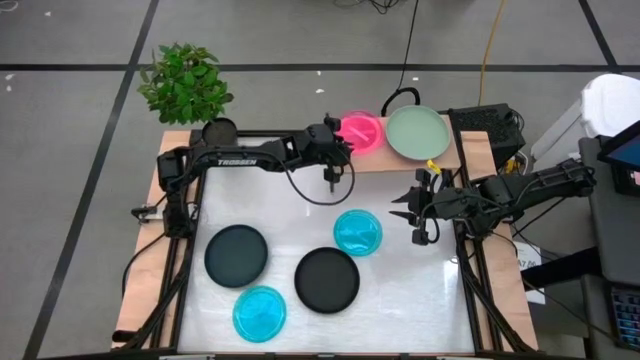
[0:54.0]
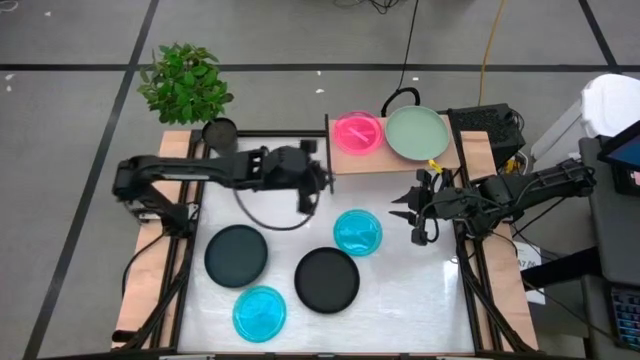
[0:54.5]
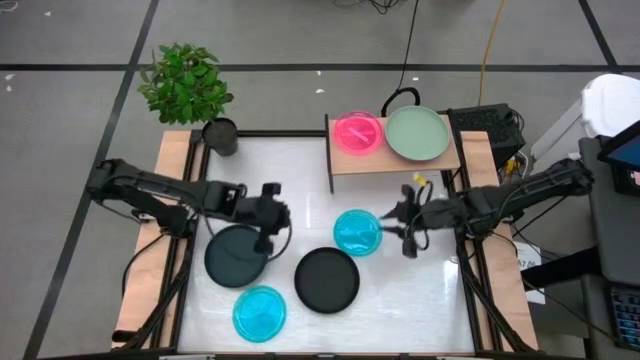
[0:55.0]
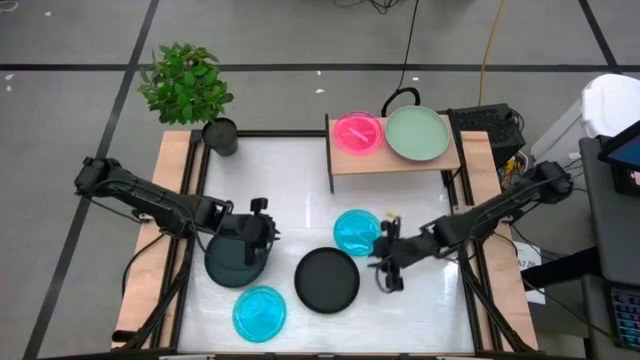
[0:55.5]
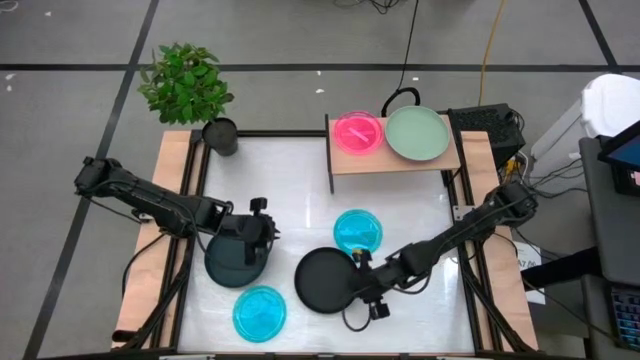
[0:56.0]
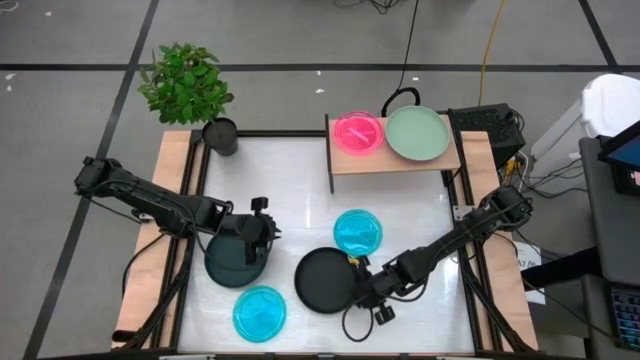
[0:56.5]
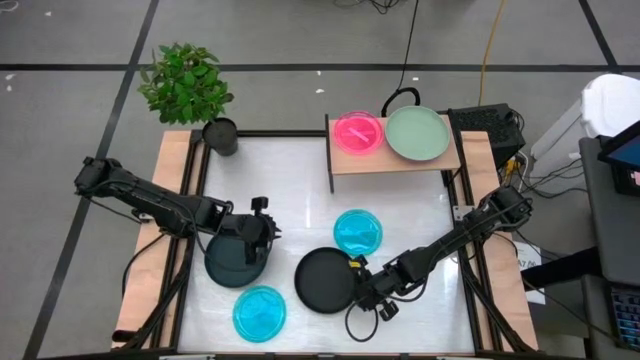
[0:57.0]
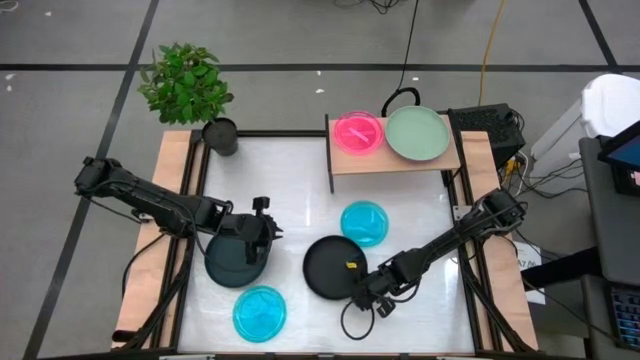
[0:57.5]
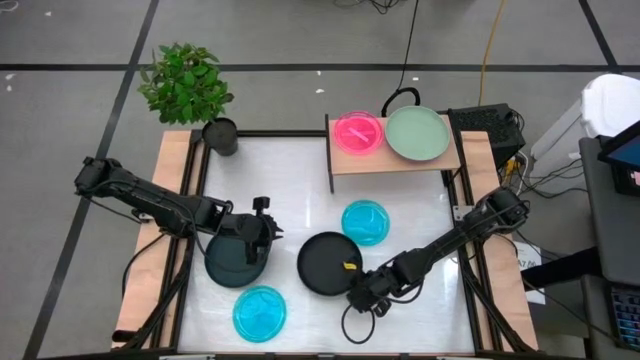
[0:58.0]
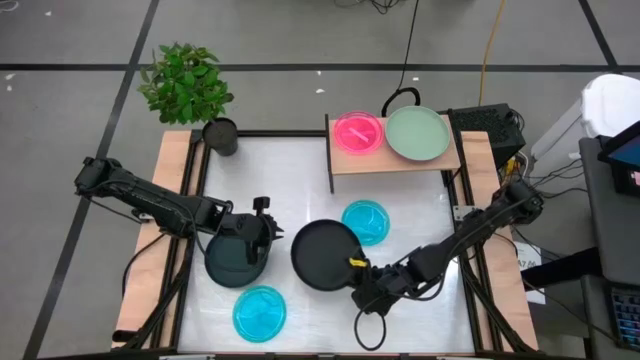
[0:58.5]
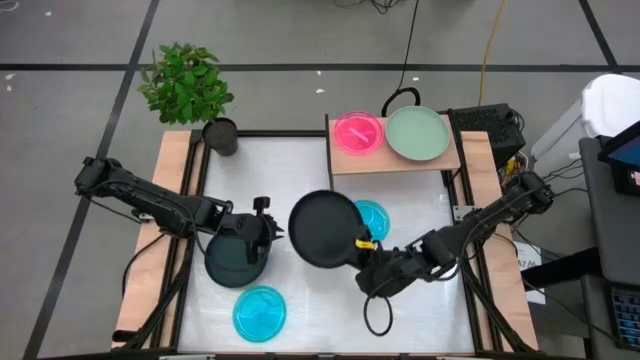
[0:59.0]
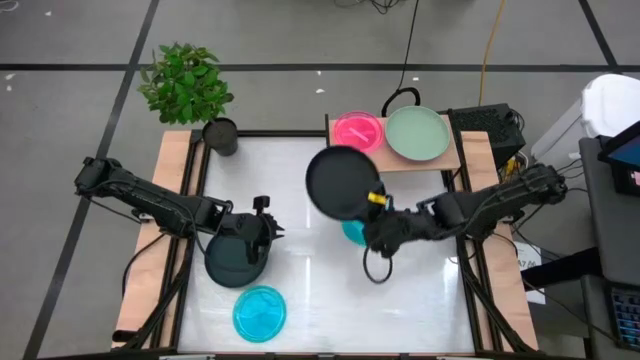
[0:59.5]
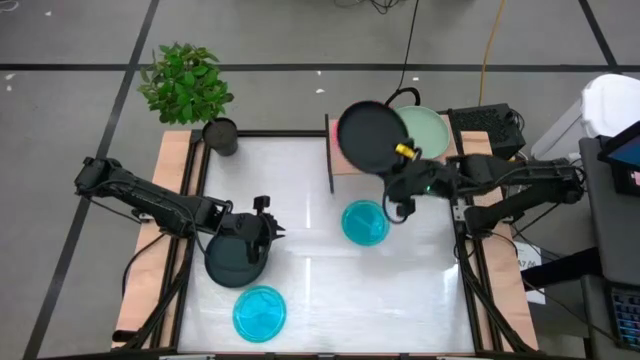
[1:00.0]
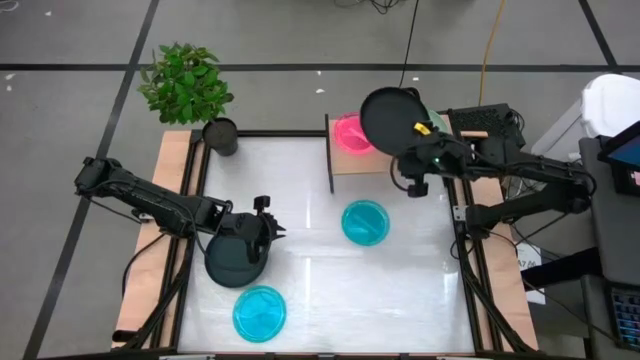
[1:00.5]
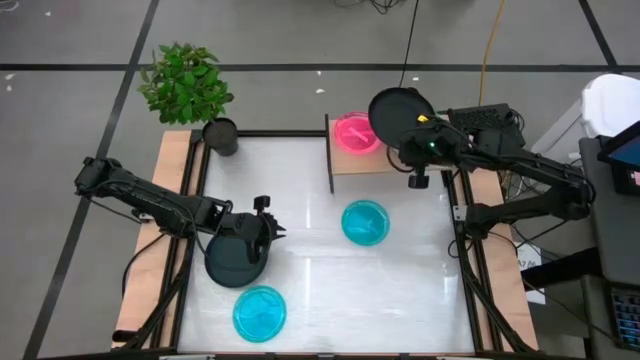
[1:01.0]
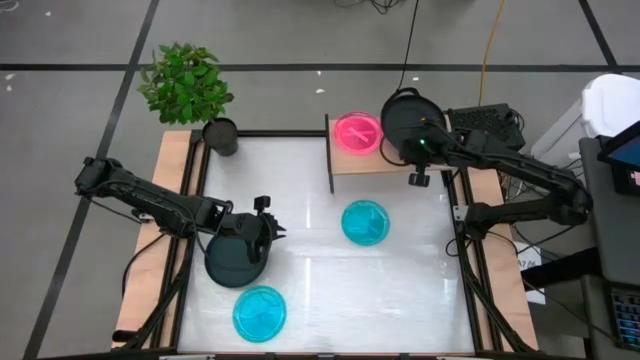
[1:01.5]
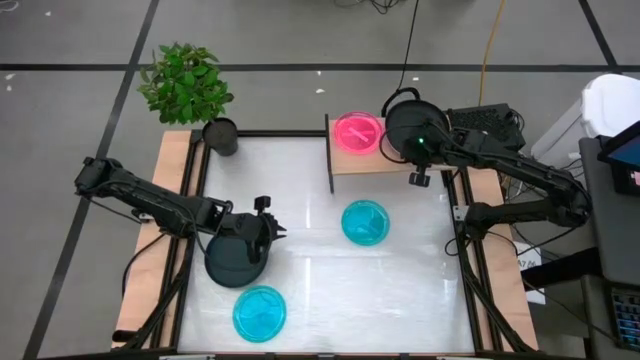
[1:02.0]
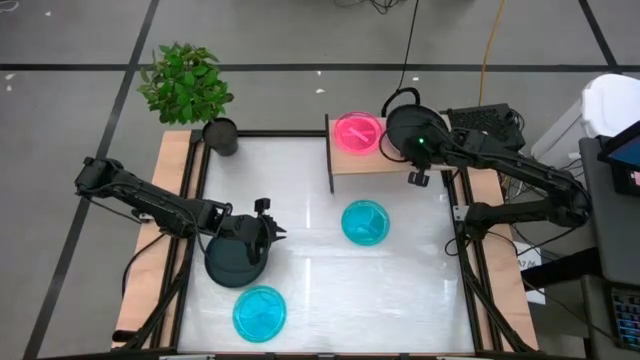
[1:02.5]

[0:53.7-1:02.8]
Task: Place and stack plates onto a shelf
Stack the black plate on top of the green plate on the shelf

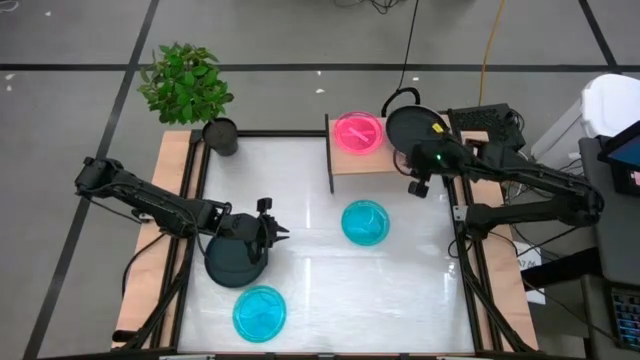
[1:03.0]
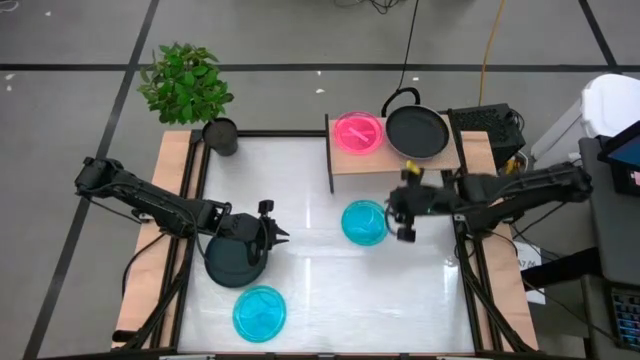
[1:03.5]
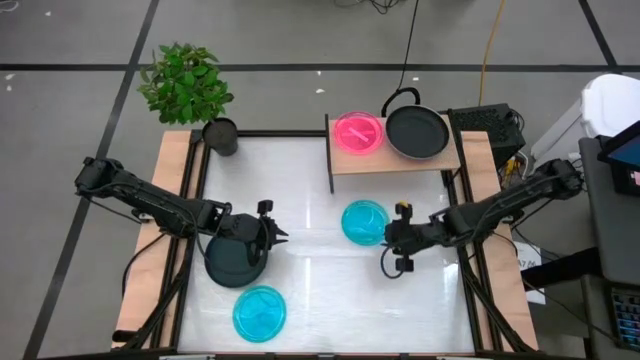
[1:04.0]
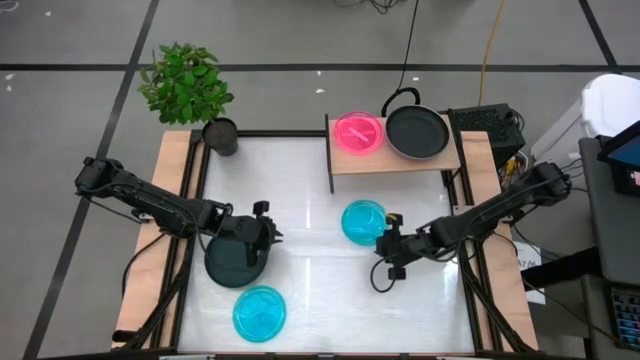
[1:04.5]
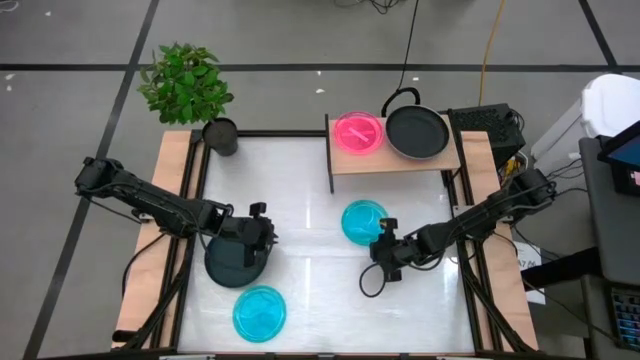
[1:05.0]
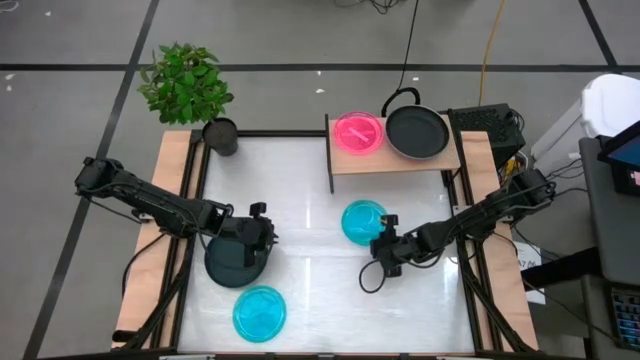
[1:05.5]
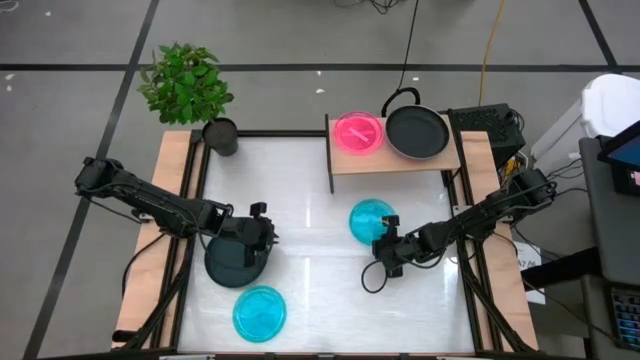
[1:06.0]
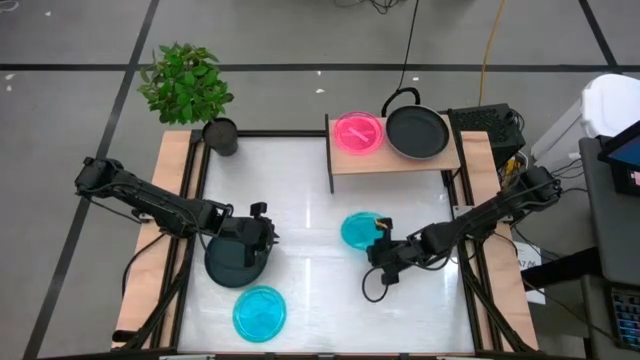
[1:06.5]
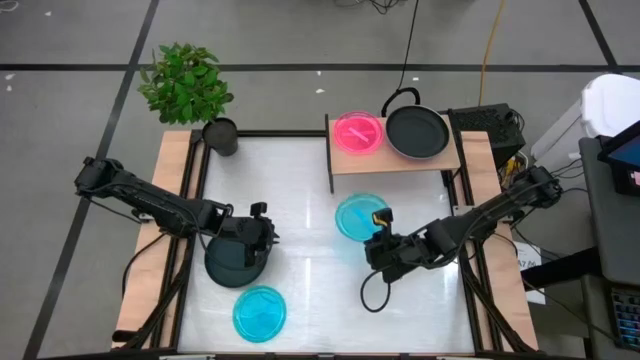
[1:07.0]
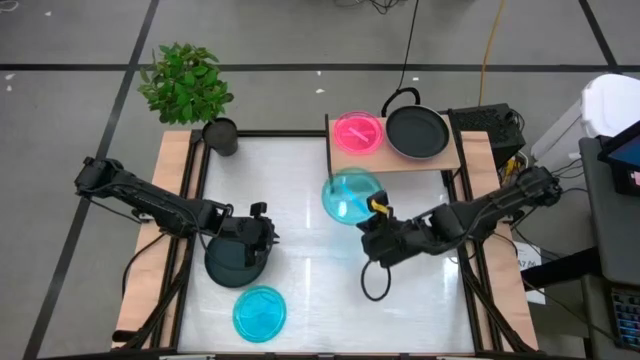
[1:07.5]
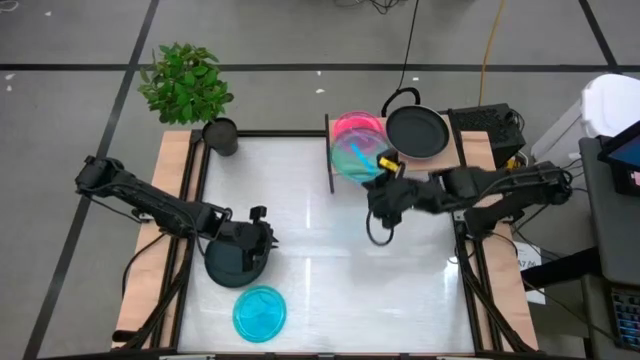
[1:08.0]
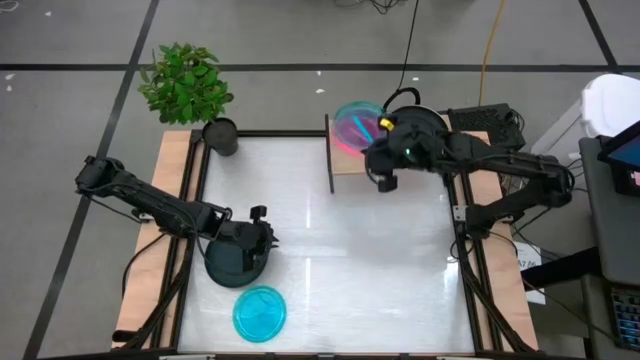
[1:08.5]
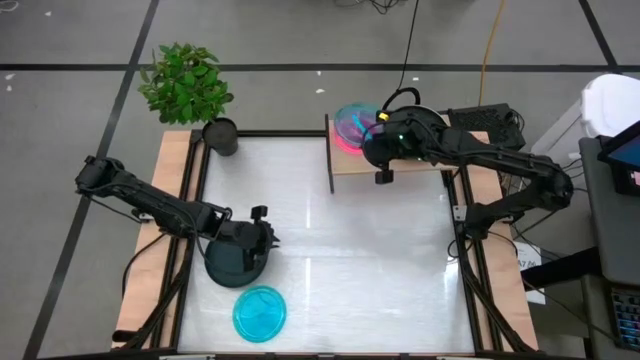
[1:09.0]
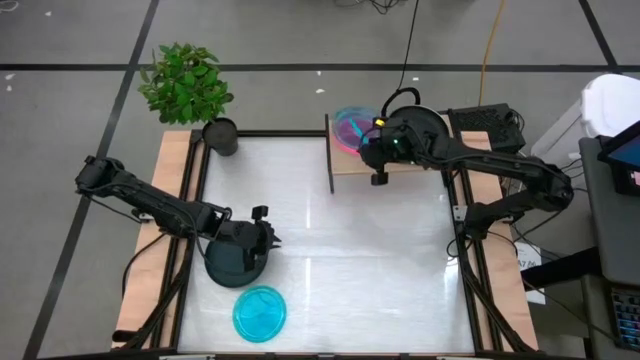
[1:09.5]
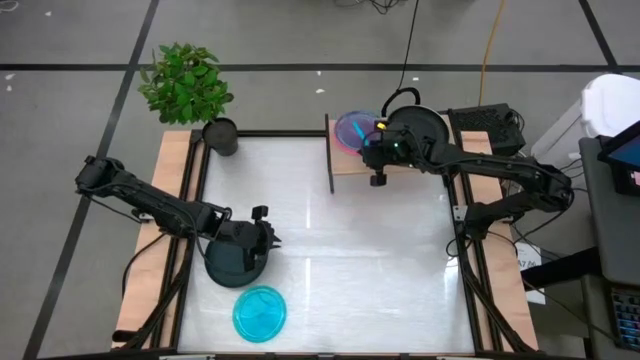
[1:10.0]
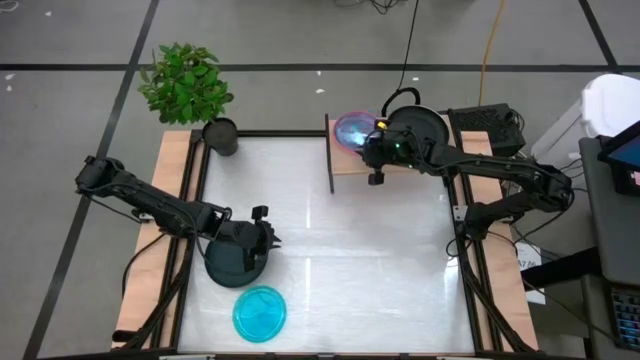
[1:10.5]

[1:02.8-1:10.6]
Stack the top blue plate on top of the pink plate on the shelf

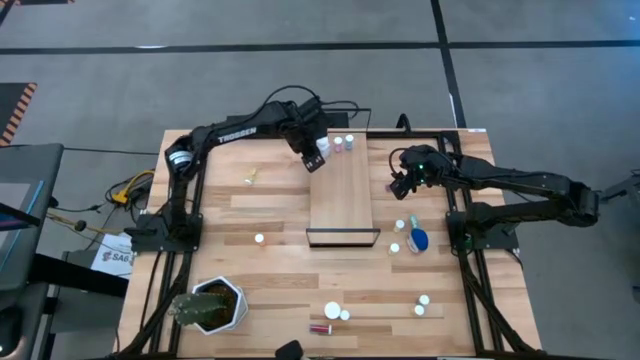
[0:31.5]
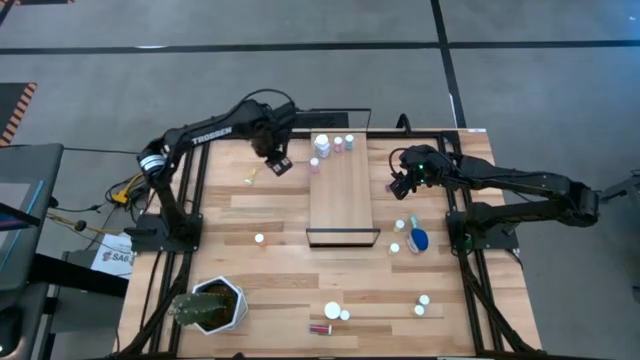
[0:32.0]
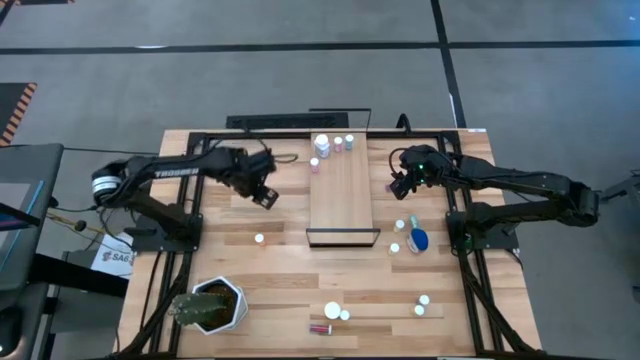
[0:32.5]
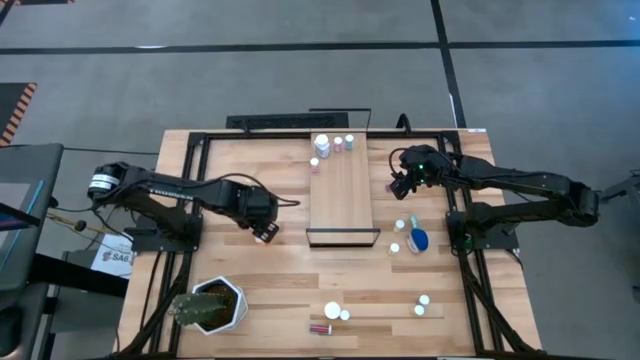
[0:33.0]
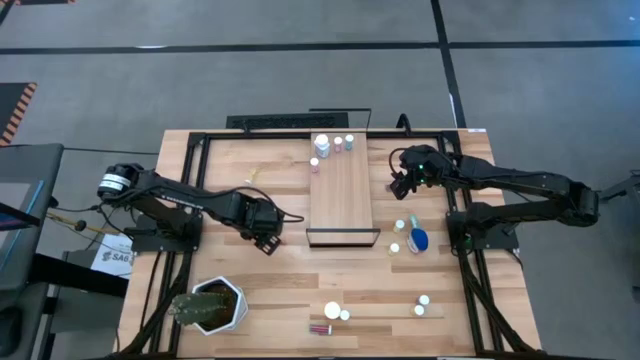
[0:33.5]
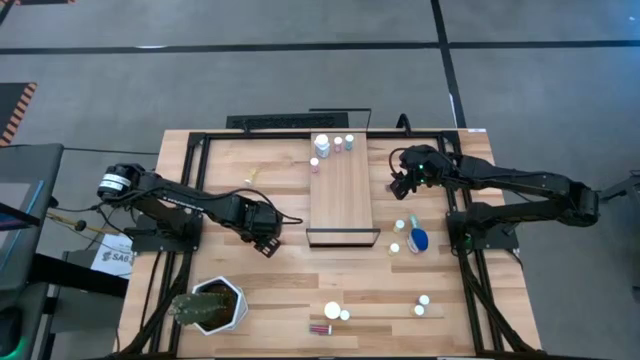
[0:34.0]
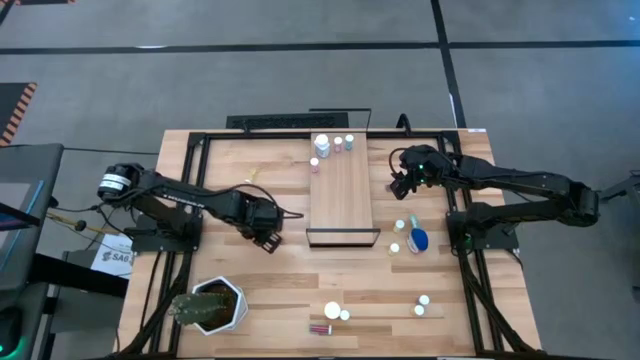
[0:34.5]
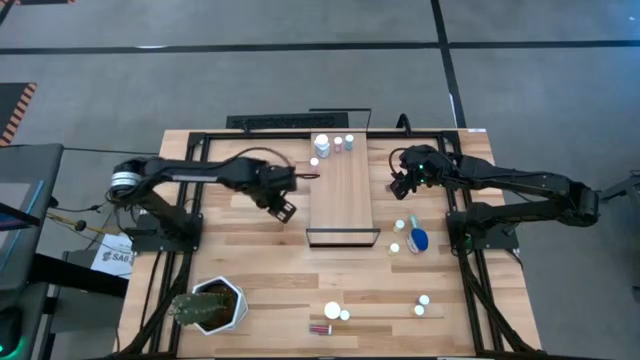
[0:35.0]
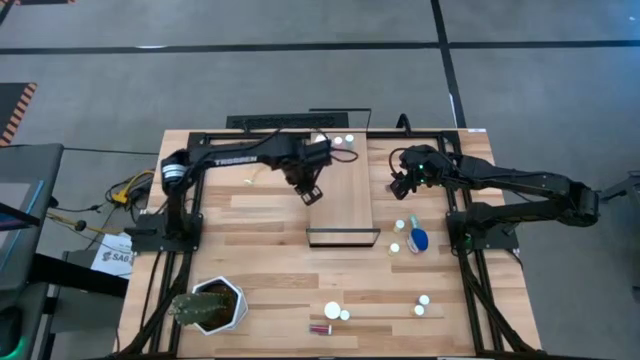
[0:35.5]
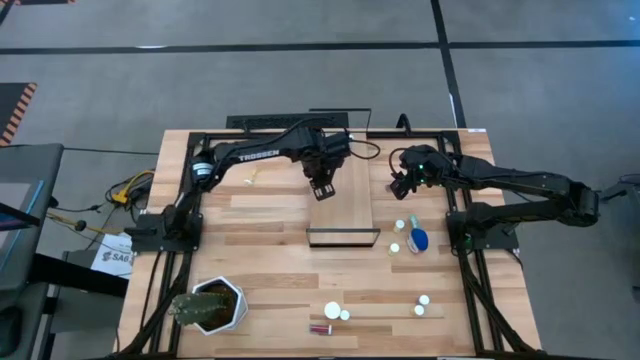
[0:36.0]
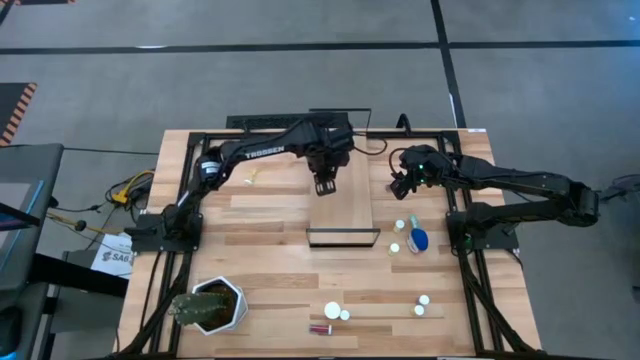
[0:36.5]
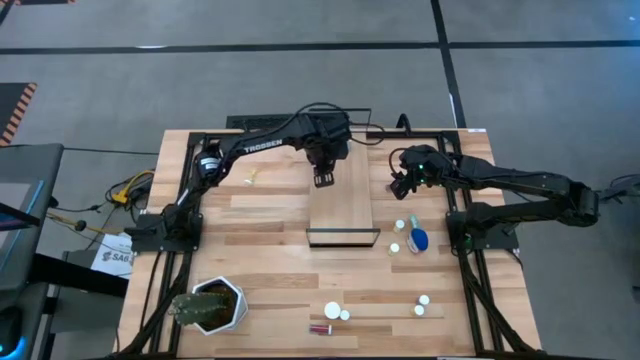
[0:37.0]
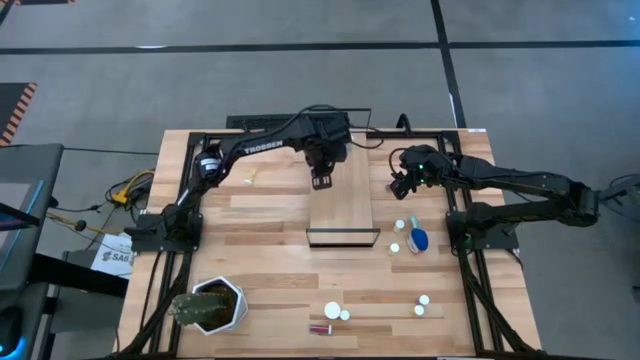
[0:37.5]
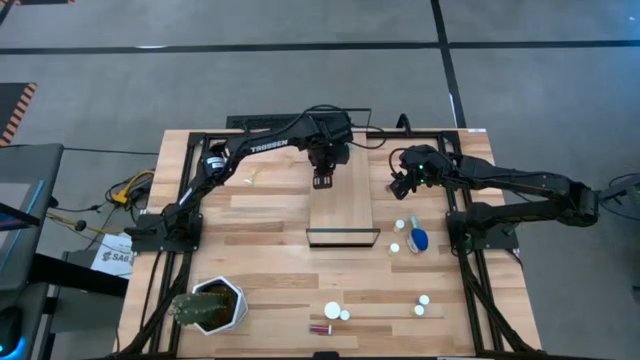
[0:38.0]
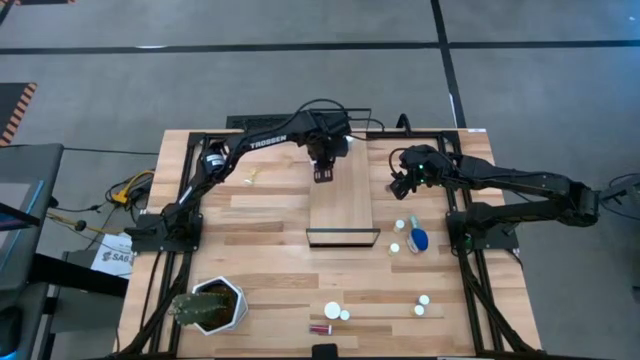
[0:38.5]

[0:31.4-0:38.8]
Task: Pick and place medicine bottles onto shelf by color
Put the orange pill bottle on the shelf
